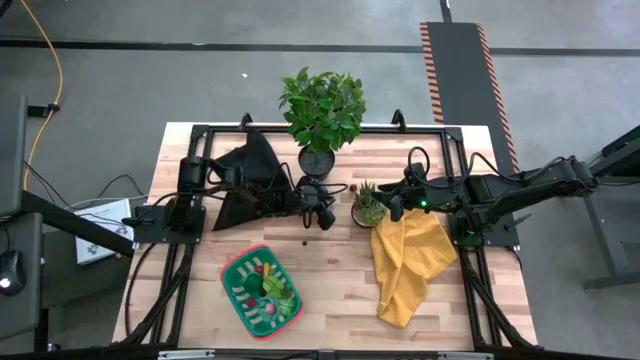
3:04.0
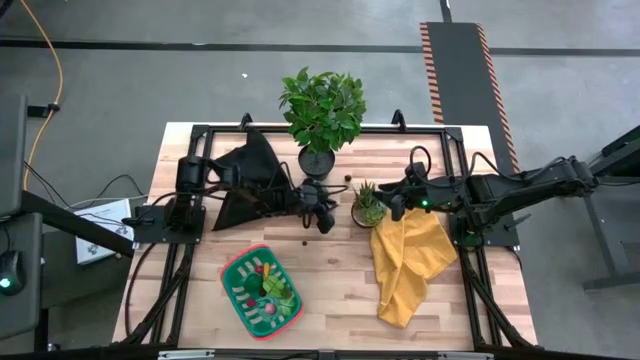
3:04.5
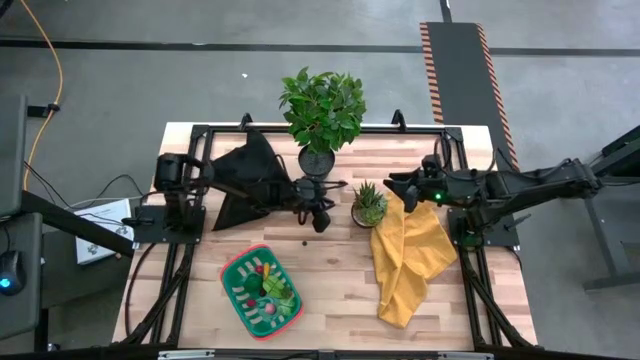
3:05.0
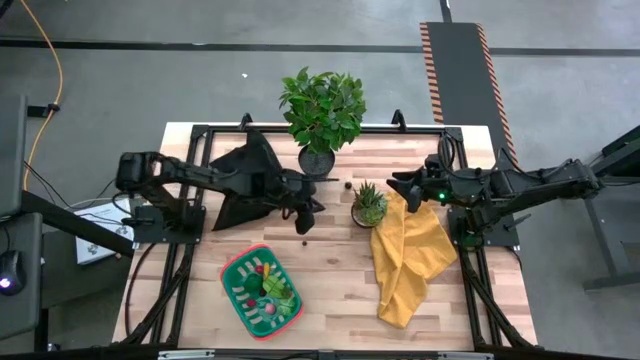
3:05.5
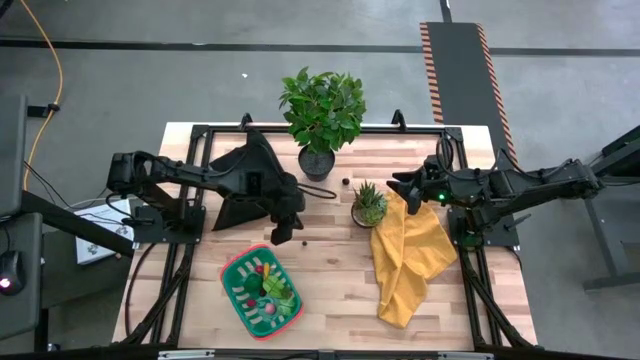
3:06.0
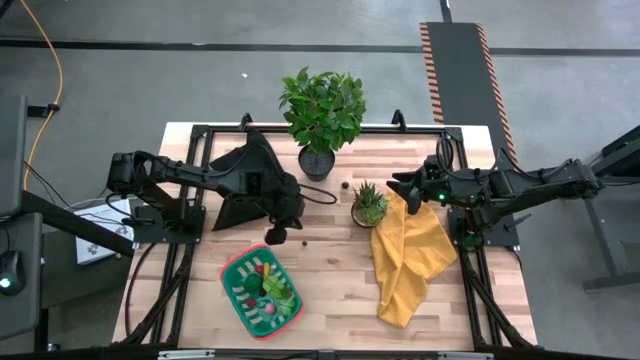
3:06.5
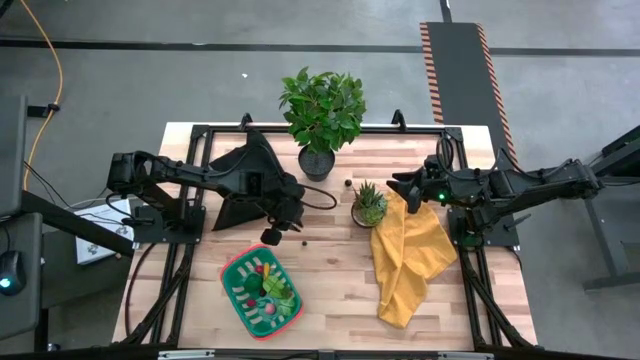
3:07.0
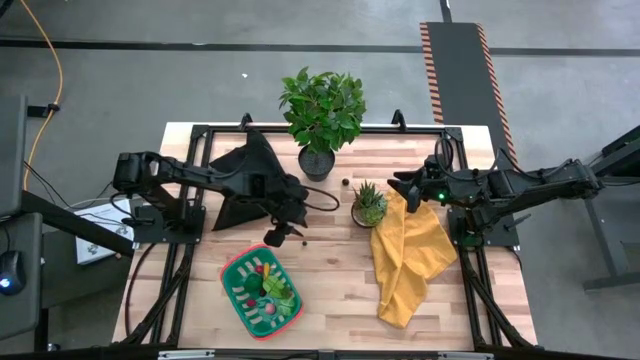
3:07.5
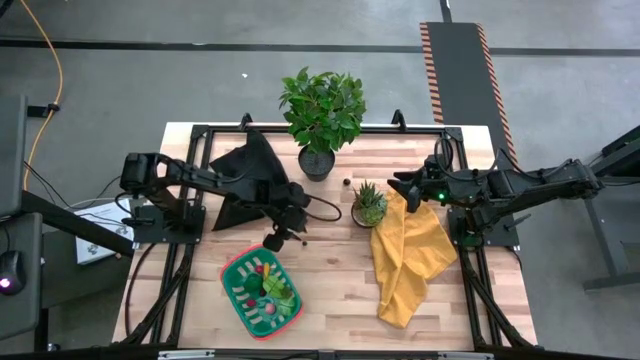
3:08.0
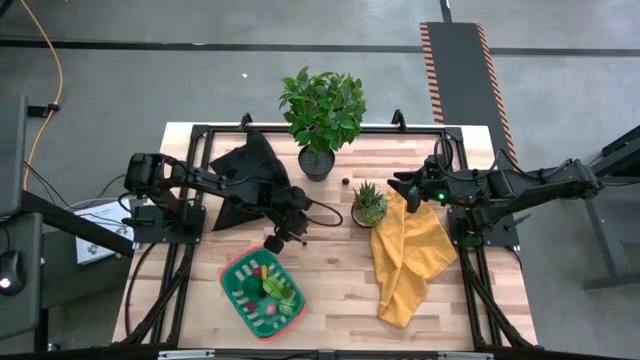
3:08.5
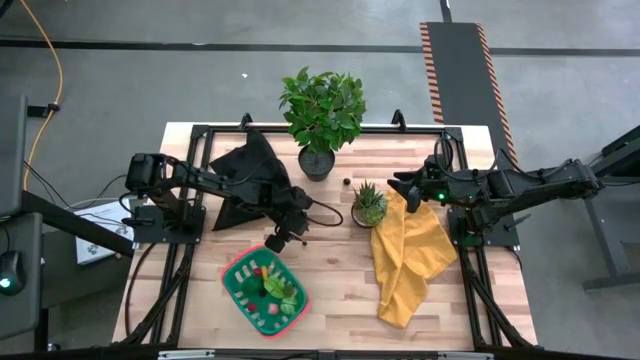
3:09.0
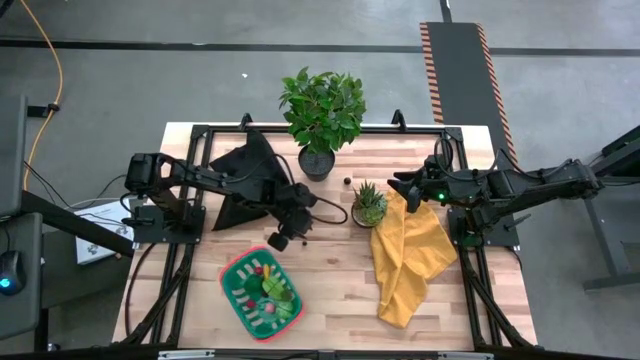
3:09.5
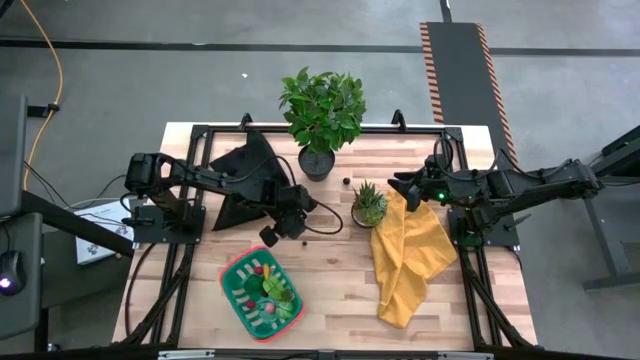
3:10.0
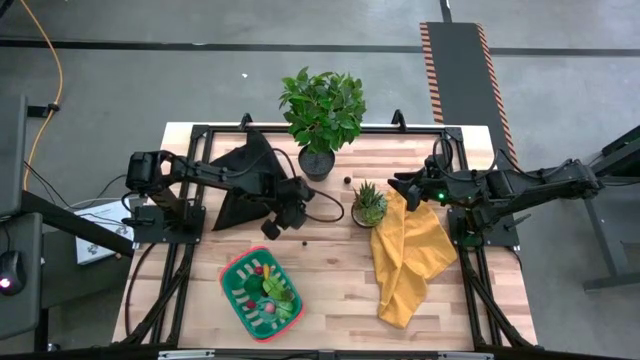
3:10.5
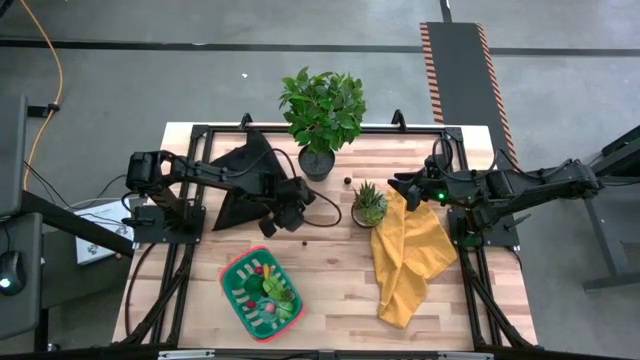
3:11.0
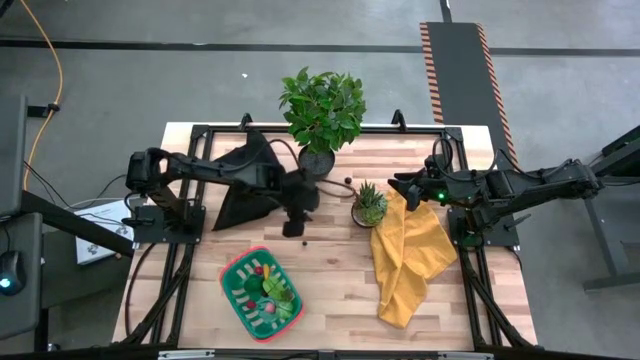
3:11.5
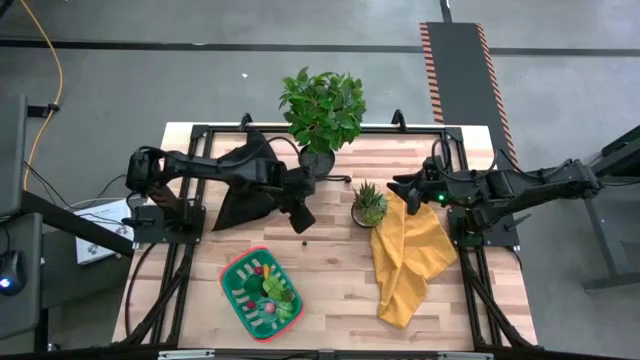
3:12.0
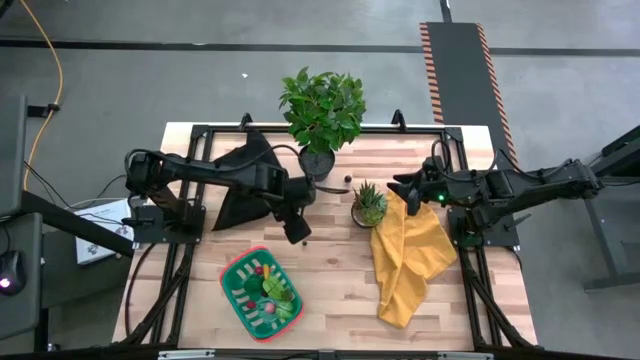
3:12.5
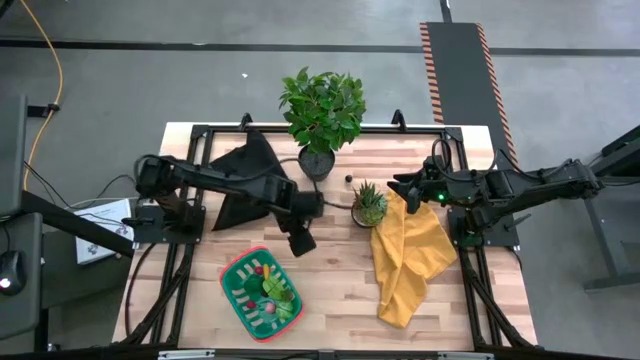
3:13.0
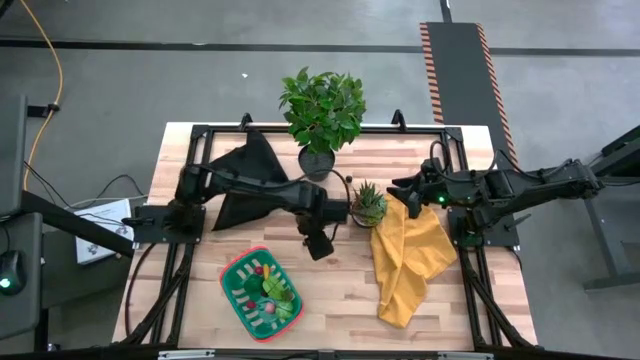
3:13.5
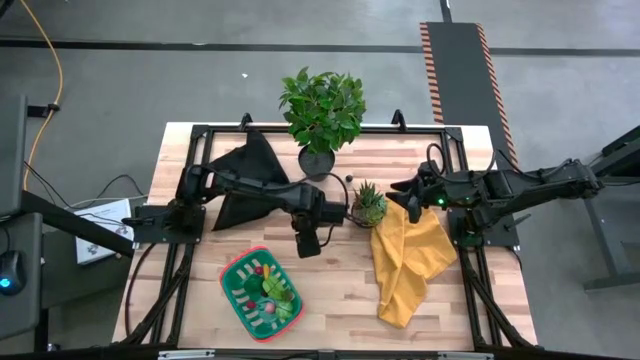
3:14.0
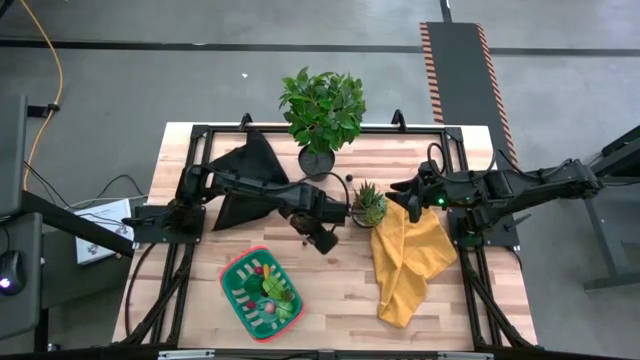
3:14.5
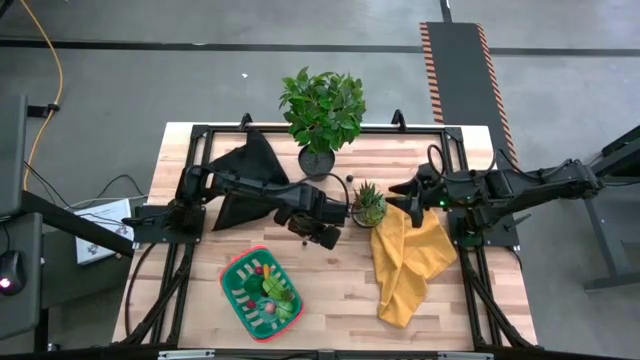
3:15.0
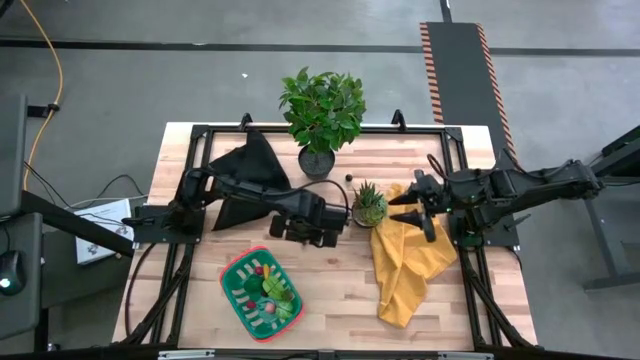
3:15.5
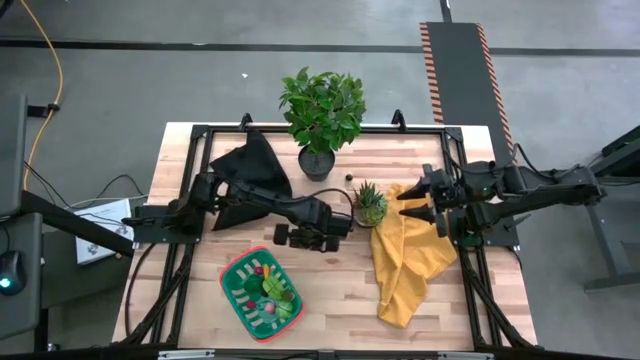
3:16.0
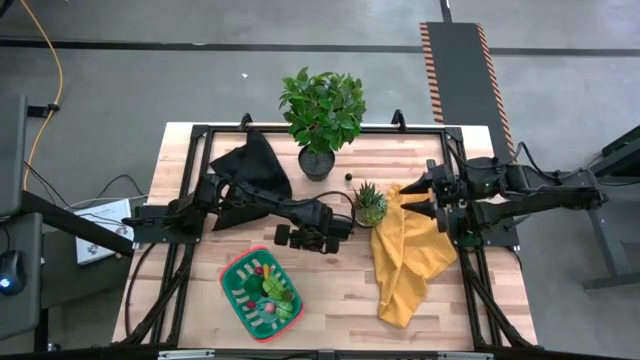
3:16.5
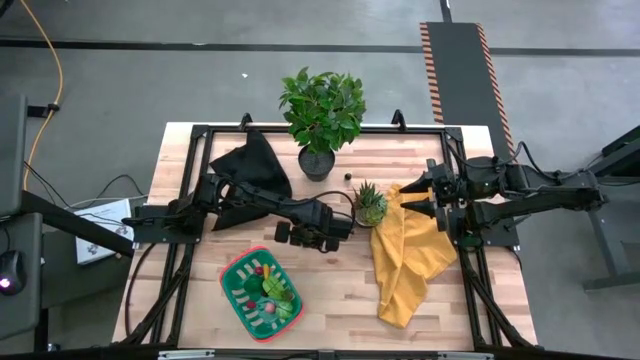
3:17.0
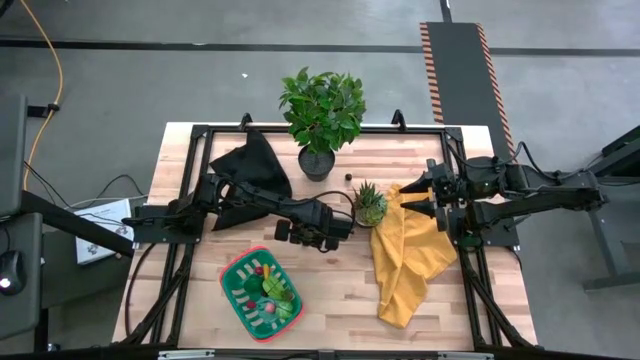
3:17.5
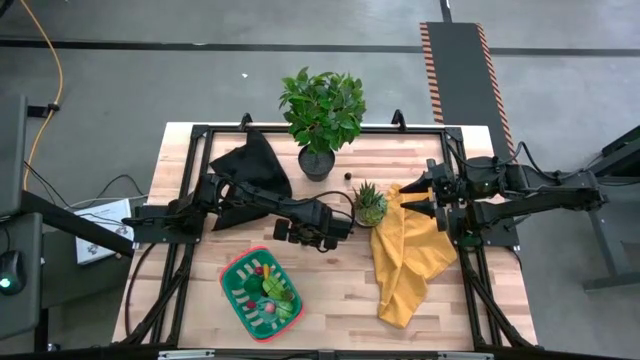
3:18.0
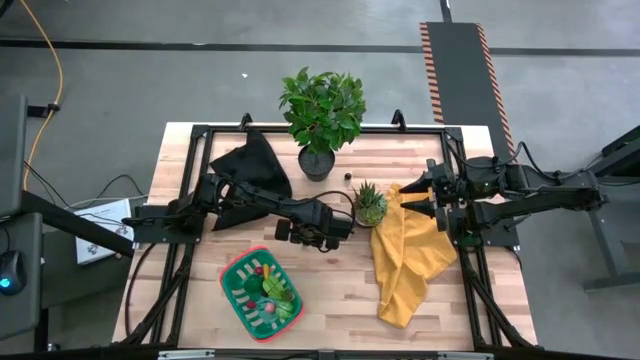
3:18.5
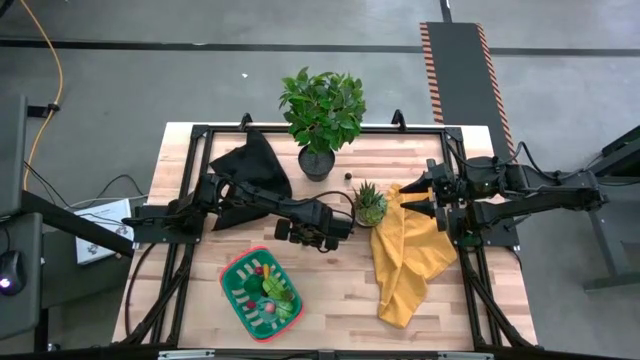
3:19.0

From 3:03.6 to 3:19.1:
Task: Pick and placing Produce into tupperware
Put the blueberry into the blue basket

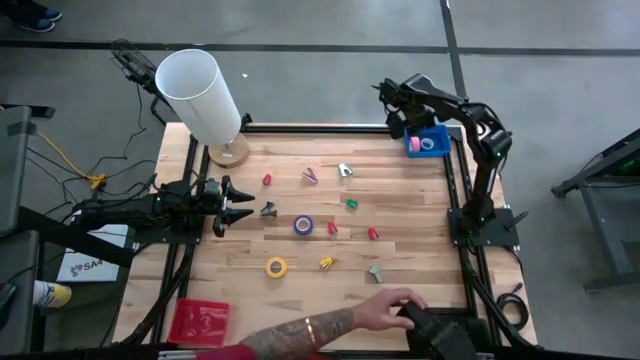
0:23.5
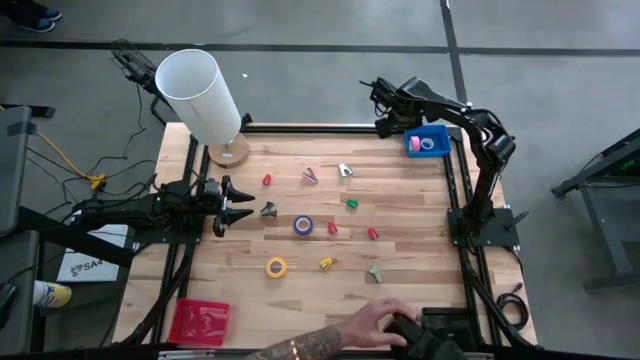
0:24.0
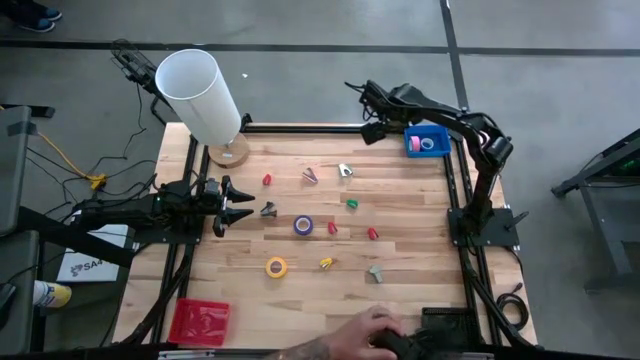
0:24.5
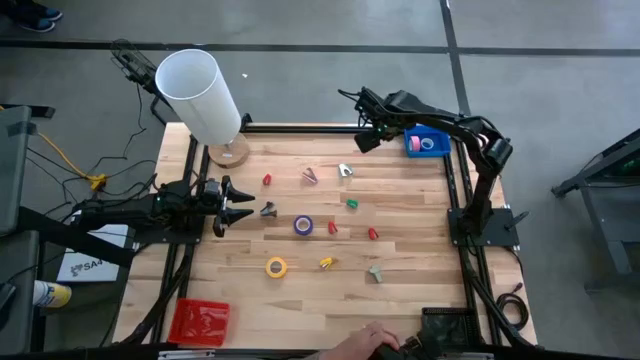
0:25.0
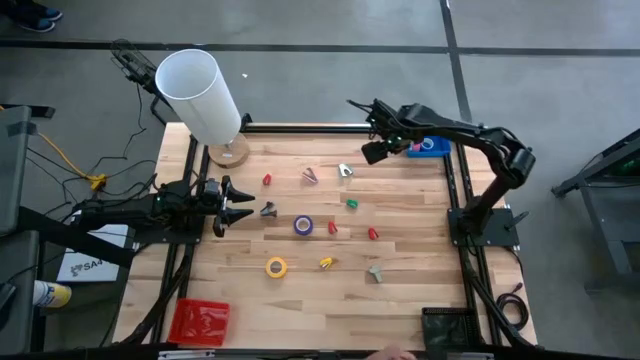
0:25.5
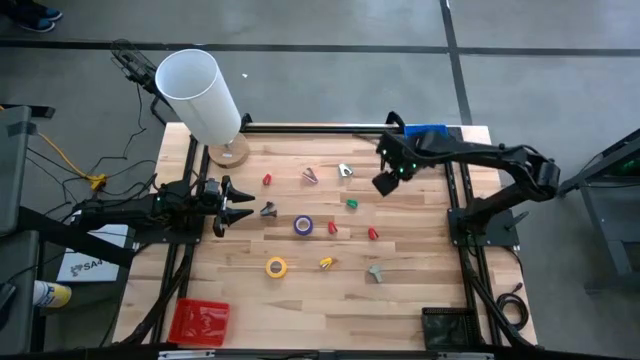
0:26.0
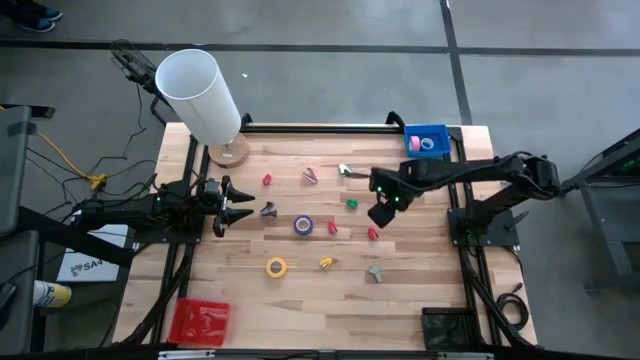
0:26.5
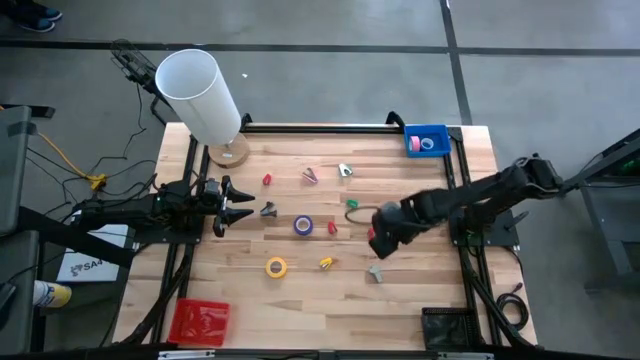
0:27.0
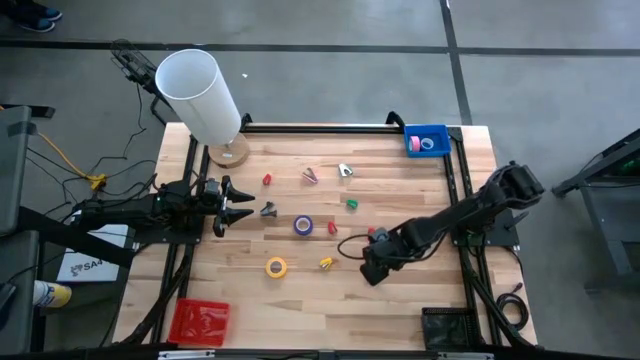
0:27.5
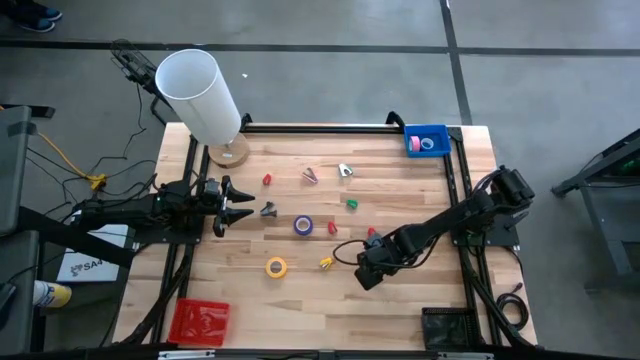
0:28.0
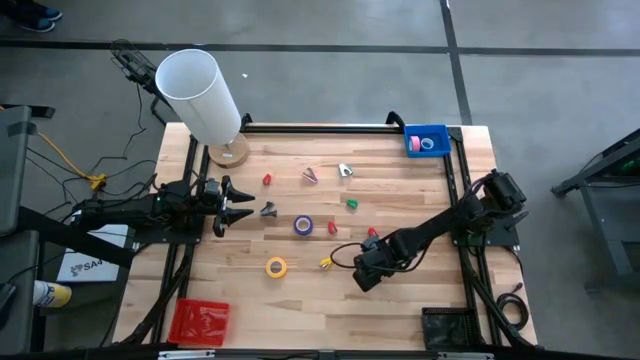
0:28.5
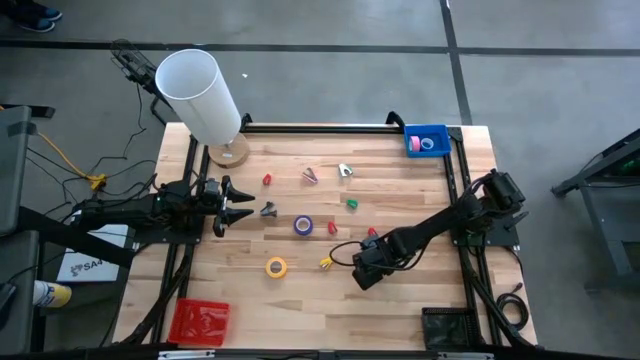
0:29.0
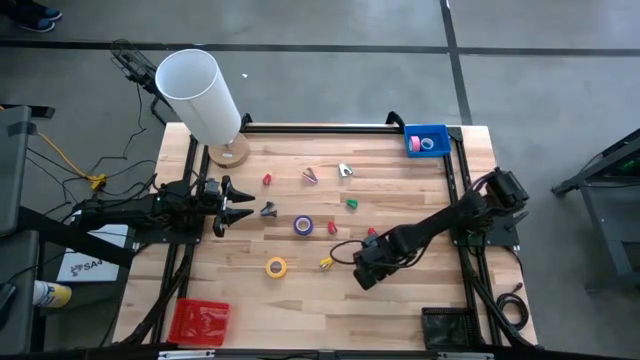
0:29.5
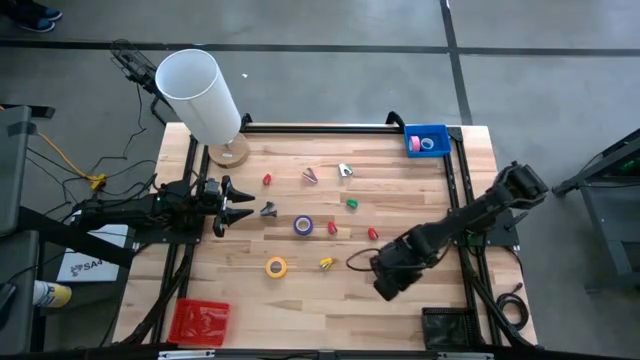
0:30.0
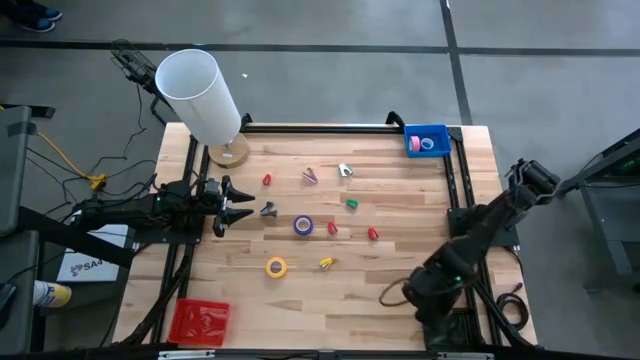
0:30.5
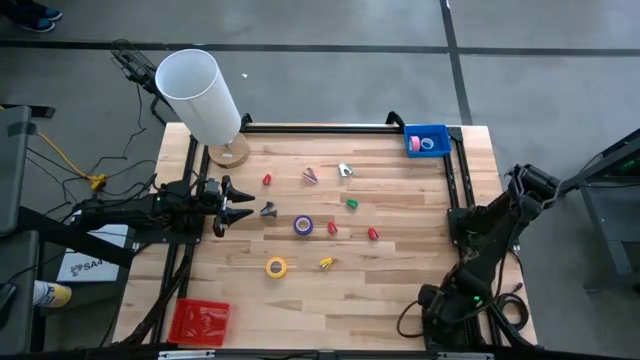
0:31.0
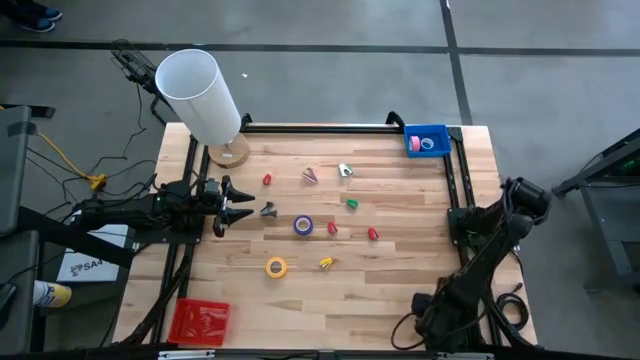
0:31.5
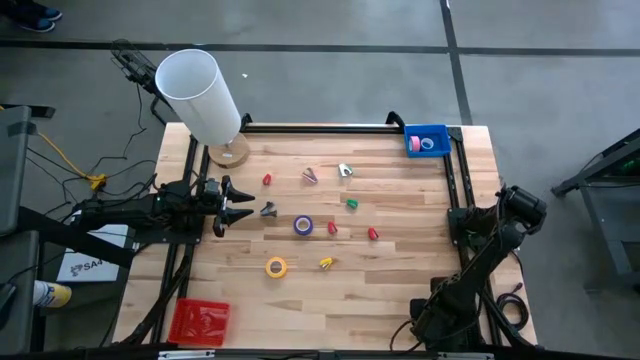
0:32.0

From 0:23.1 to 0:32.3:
Task: Pick and place Stapler, Stapler remover, tape
Put the white staple remover into the black bin
